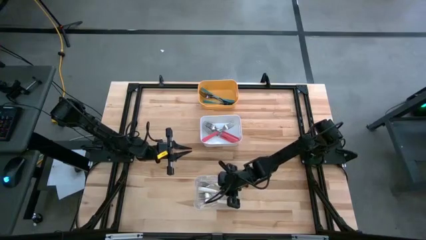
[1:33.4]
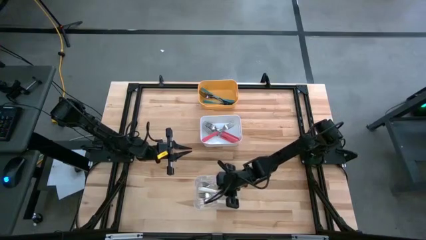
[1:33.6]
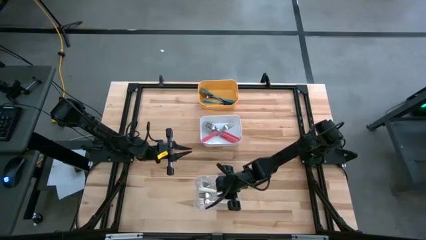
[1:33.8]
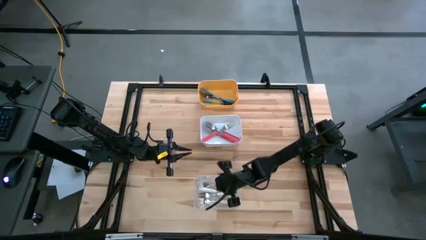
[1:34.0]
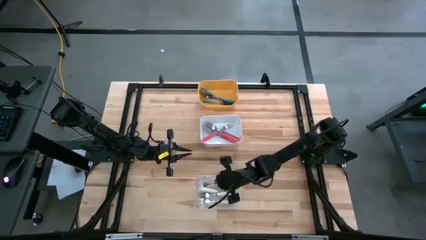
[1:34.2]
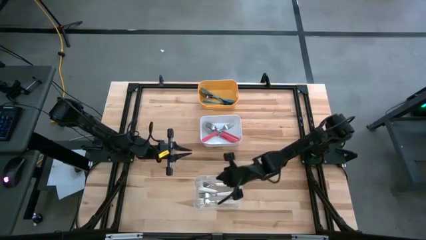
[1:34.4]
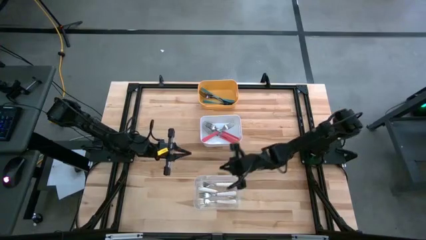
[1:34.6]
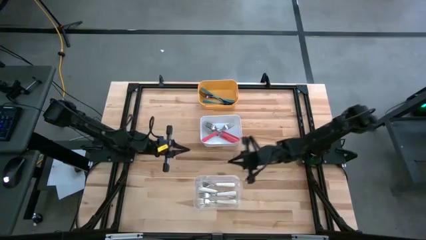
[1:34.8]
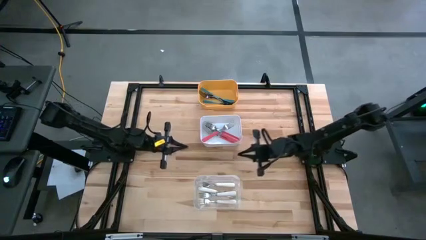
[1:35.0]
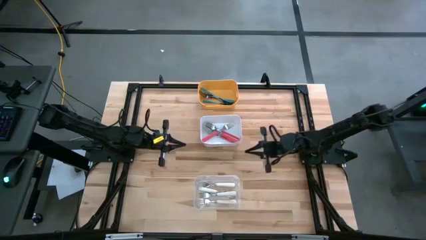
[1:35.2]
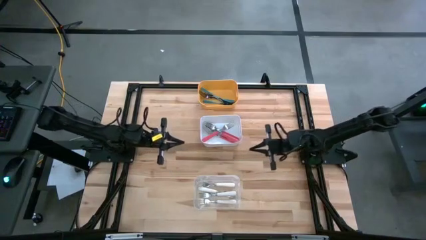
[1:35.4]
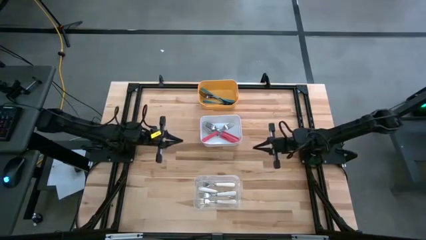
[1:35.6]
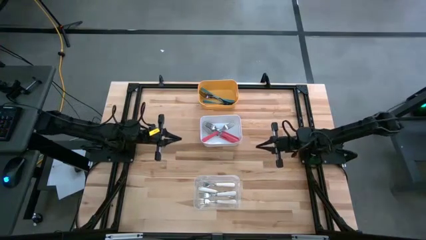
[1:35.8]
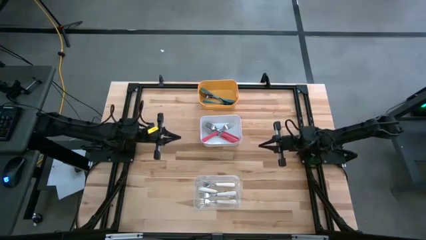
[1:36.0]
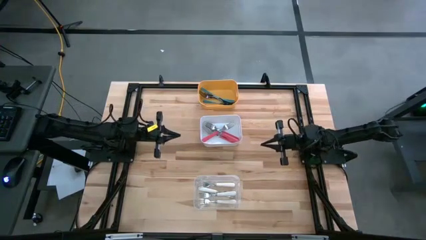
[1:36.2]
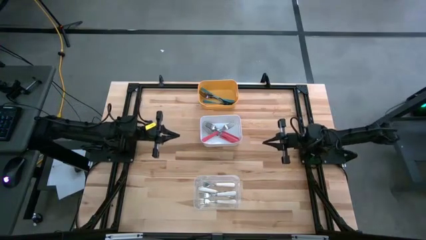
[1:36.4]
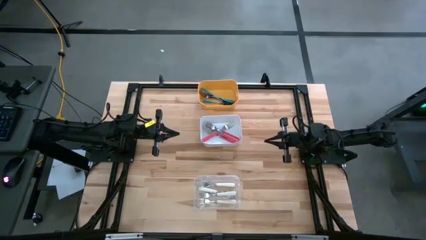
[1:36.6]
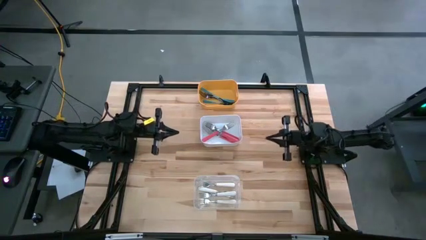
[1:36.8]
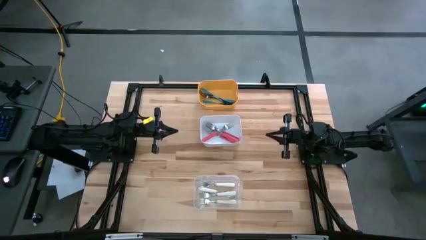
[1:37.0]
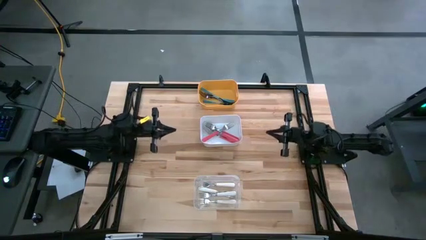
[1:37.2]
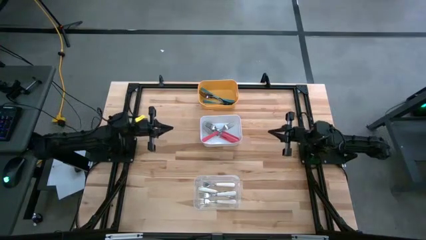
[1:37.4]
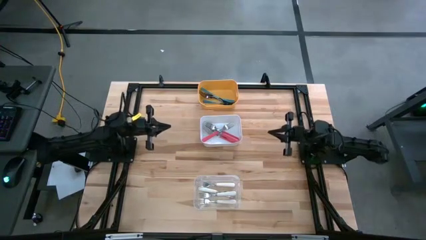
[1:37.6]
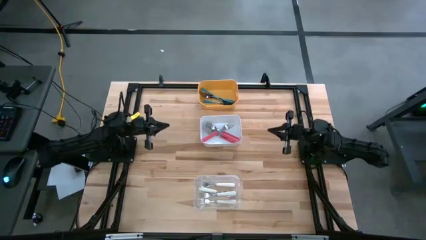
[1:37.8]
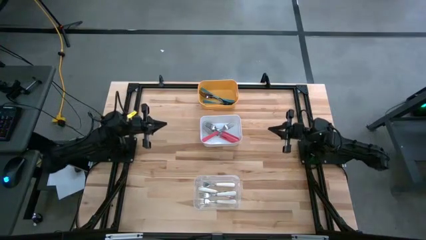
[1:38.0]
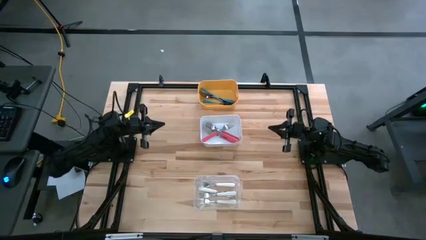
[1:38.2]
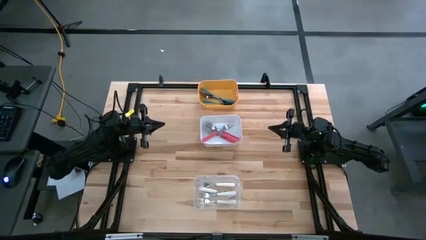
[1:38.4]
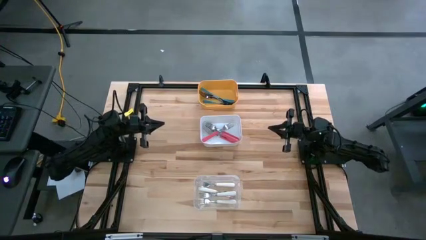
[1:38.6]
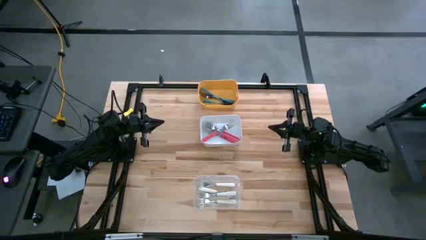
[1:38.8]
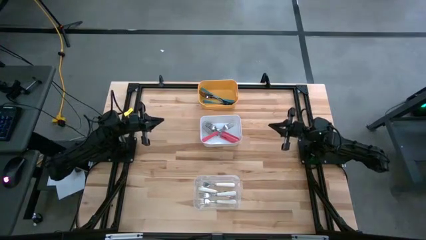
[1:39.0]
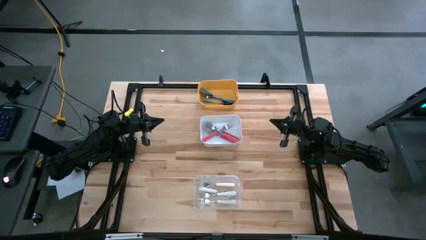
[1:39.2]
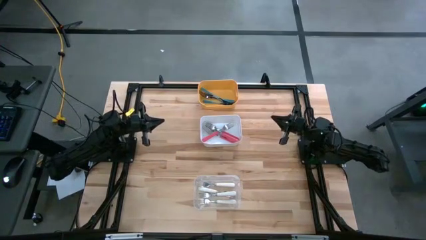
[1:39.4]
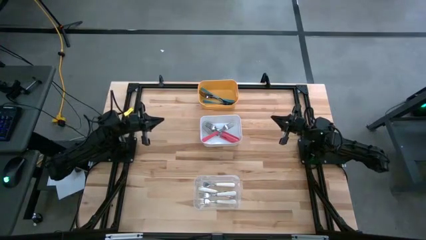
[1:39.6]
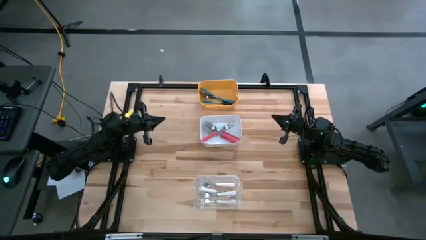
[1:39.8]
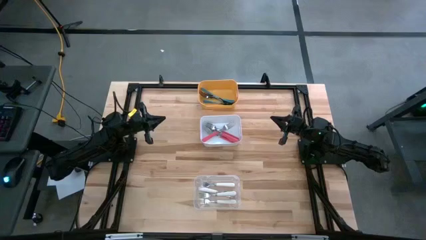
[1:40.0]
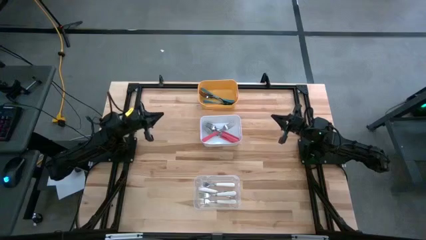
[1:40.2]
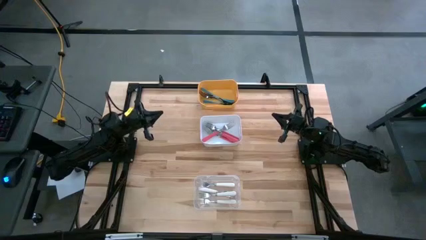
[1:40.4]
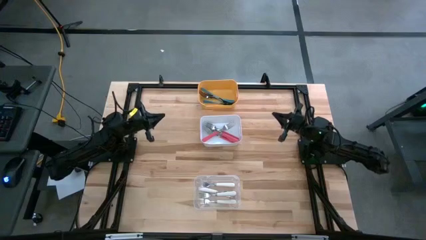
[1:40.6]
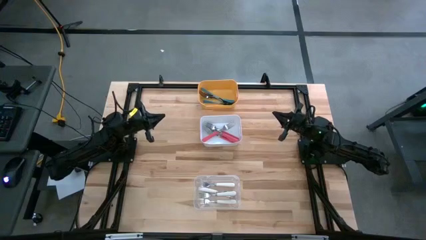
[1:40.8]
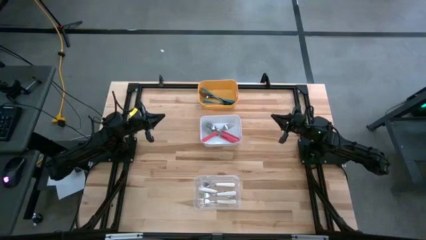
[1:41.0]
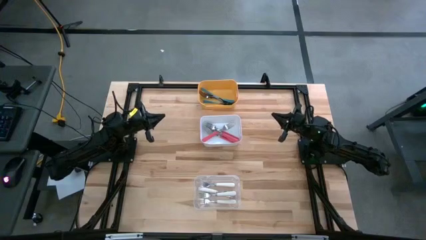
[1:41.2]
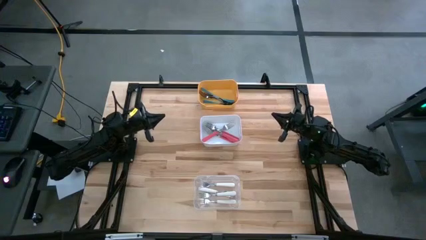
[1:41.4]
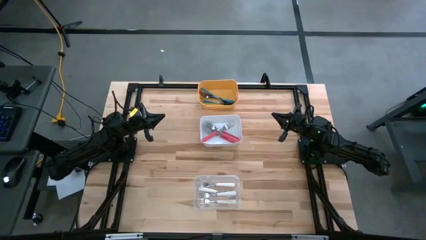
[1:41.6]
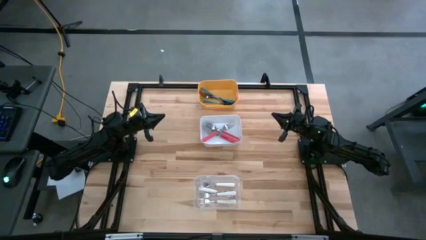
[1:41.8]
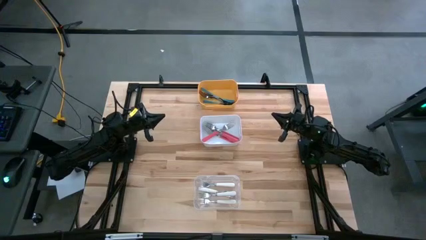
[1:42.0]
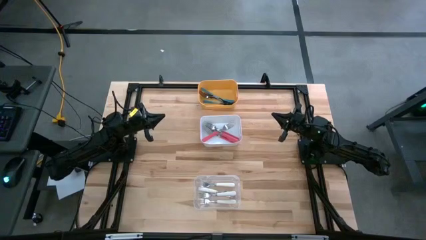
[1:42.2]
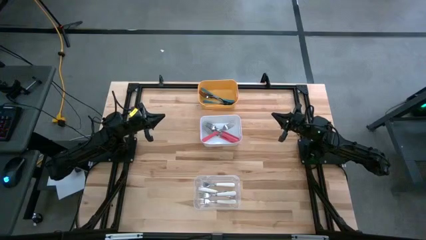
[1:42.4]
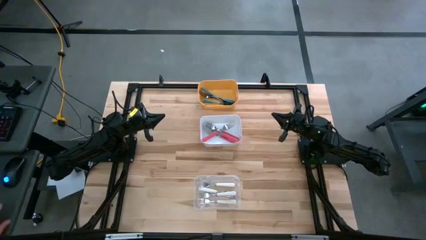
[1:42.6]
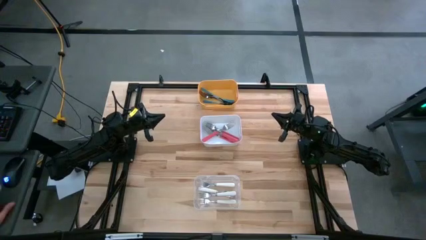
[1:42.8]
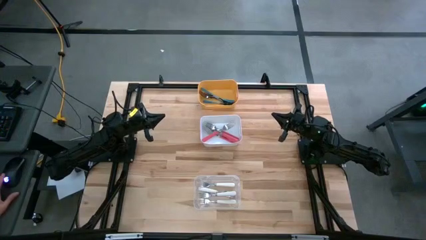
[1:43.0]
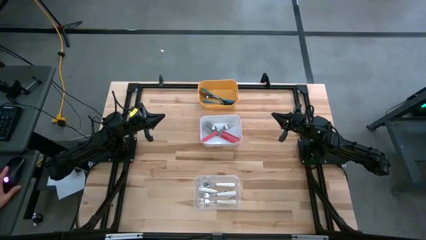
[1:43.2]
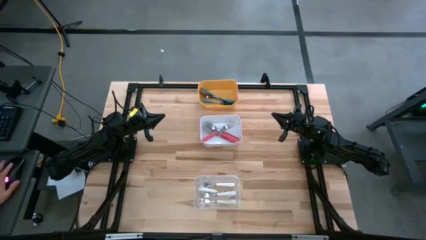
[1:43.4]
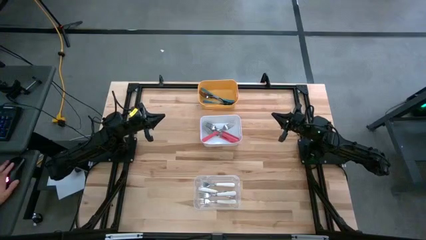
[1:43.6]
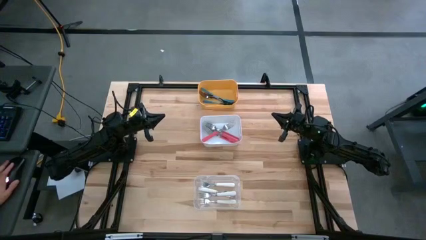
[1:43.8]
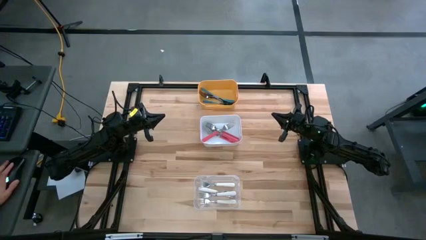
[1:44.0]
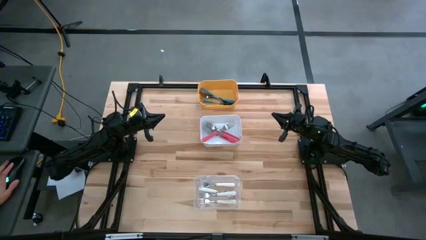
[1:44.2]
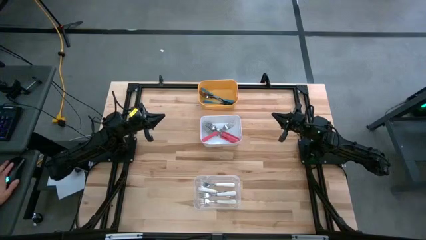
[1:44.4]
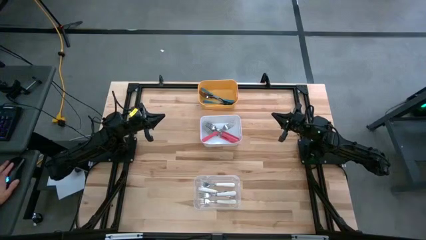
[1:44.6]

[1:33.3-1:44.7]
Task: Sort silverware by color (type)
Return to Home Position

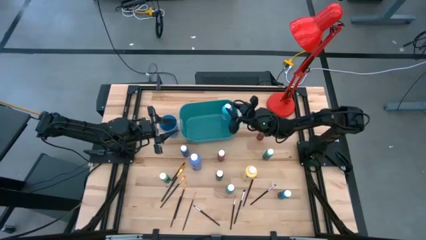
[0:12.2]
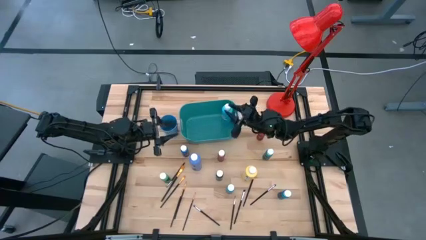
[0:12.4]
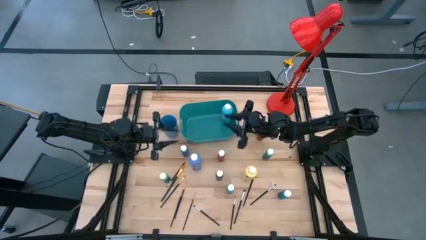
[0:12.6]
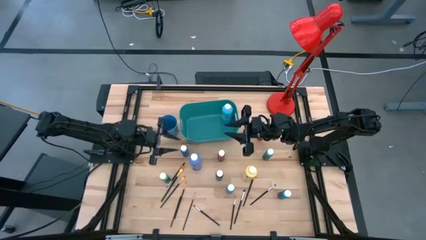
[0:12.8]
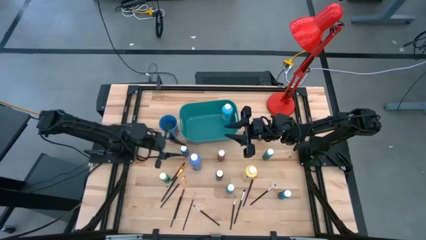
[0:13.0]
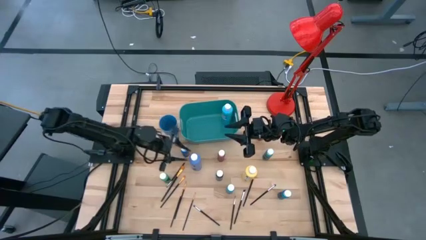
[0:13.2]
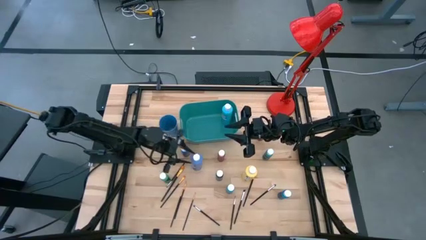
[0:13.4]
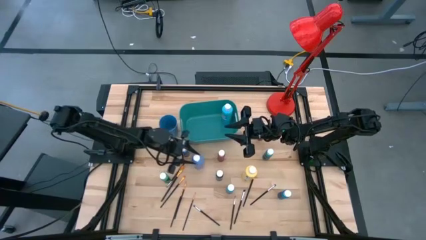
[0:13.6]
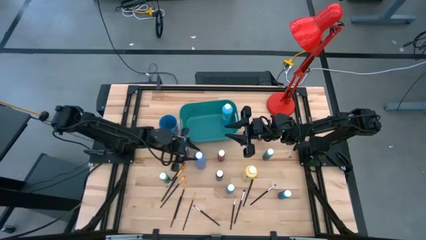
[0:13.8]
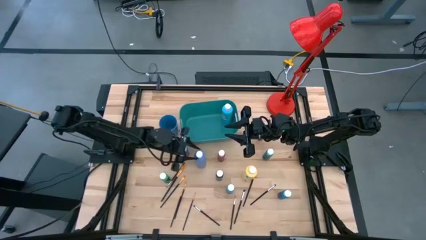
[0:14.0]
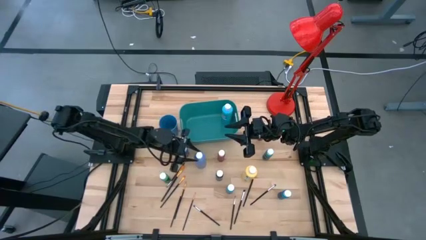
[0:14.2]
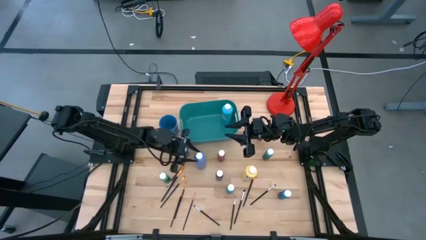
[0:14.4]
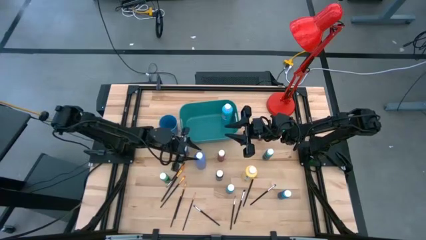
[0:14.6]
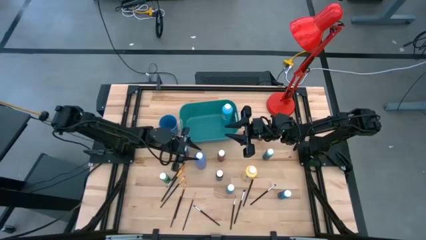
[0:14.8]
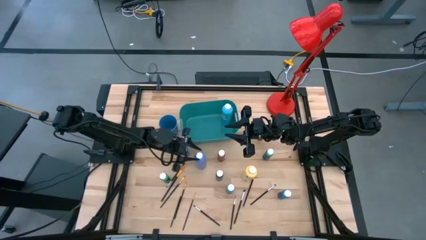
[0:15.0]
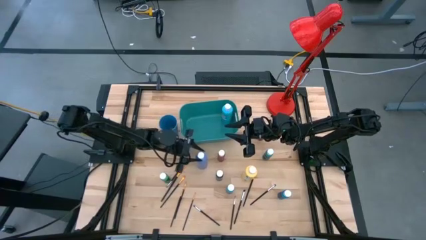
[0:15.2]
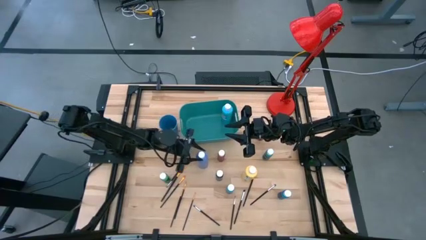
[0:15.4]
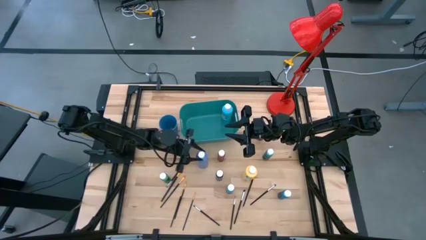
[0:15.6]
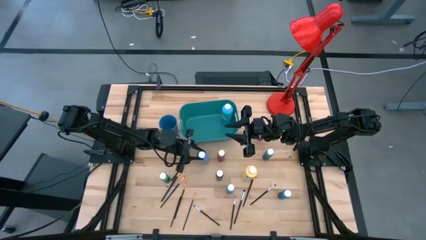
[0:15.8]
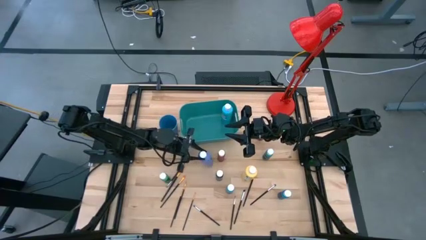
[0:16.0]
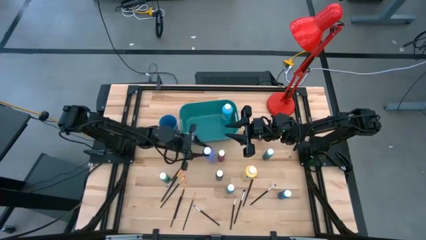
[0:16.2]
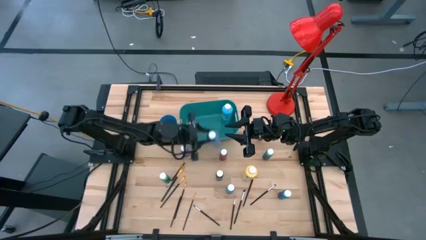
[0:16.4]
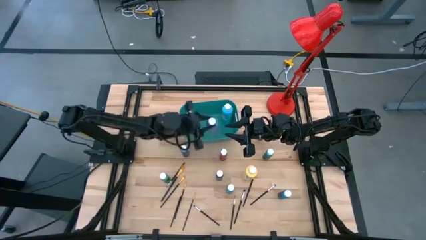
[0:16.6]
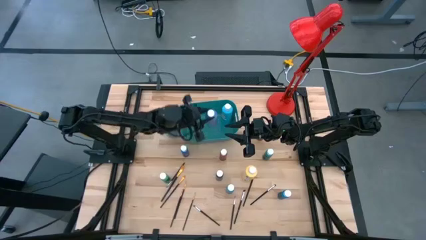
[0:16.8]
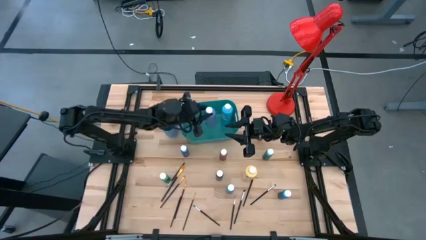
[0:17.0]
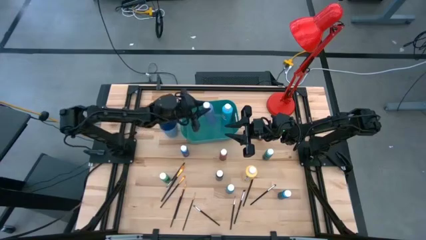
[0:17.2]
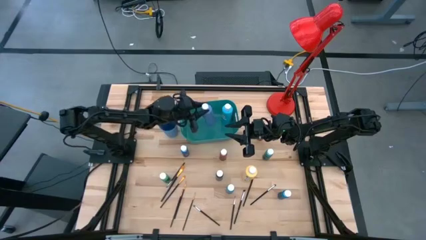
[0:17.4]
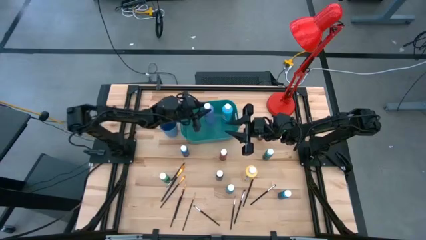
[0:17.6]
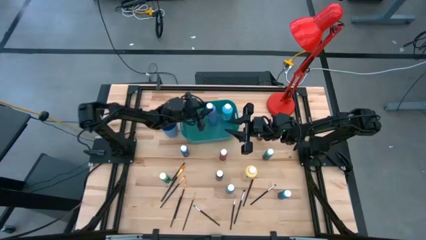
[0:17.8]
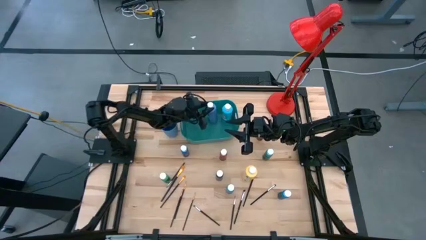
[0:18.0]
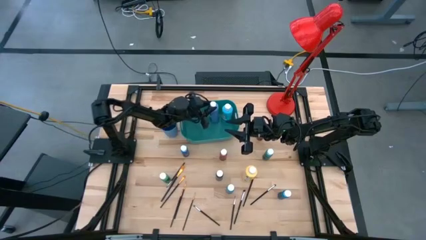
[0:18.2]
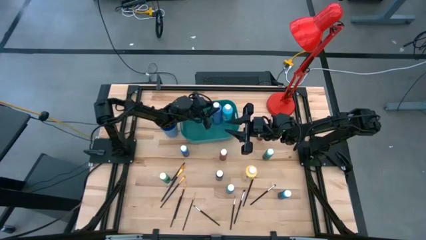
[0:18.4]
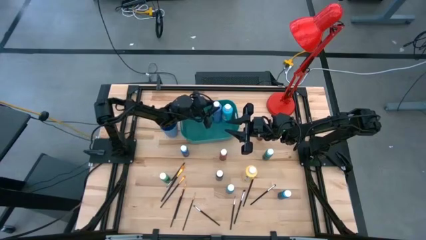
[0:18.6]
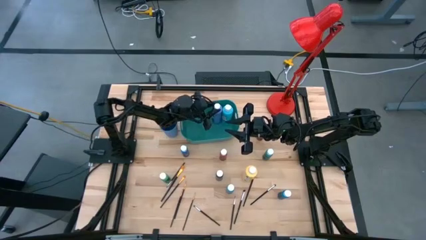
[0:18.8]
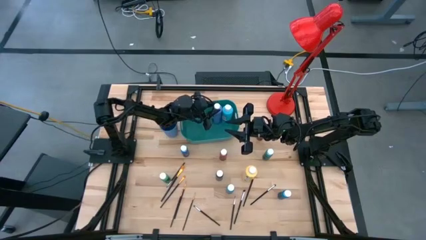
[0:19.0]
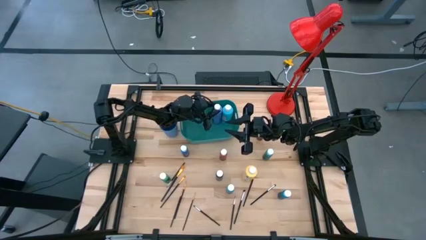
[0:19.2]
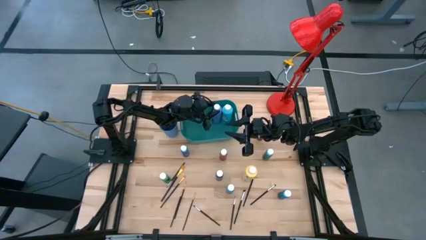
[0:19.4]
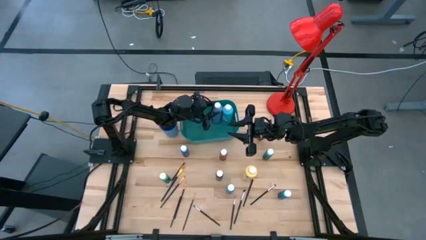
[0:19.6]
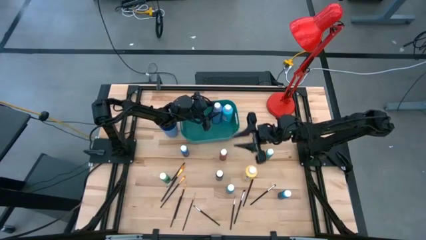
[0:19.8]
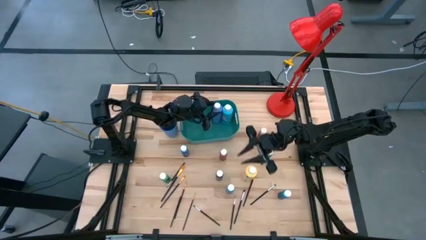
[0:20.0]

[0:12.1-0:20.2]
Task: Pick & Place Paint Supplies
Put the large violet paint bottle into the green bin
